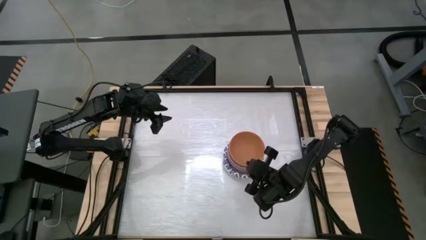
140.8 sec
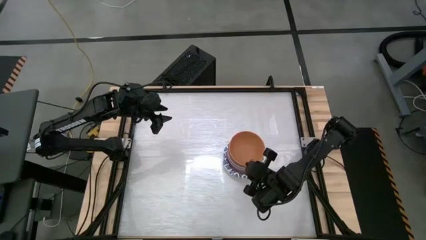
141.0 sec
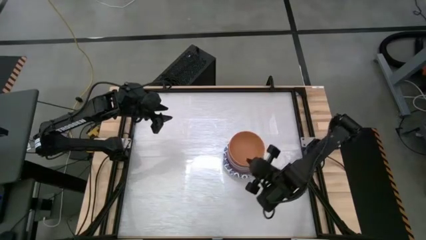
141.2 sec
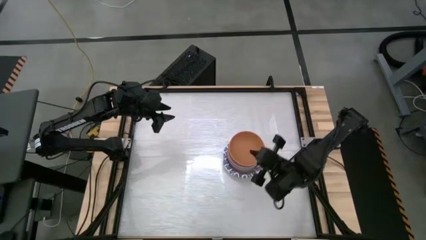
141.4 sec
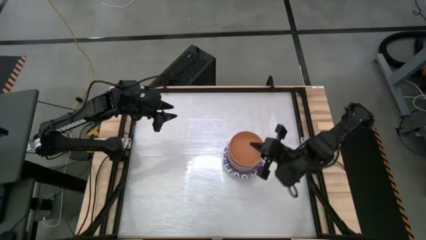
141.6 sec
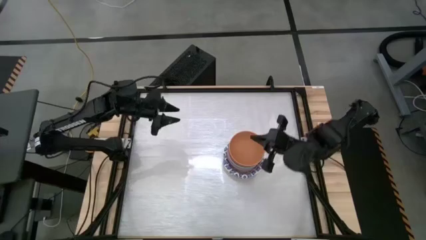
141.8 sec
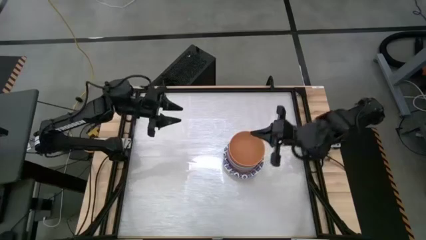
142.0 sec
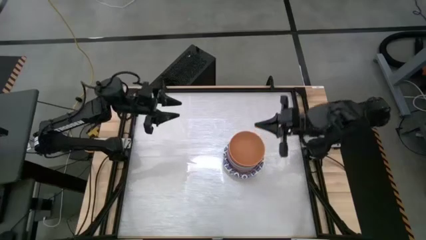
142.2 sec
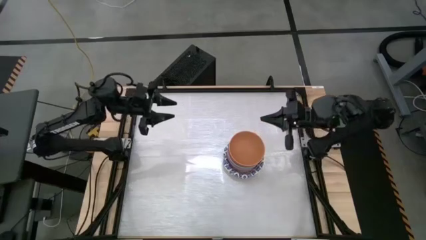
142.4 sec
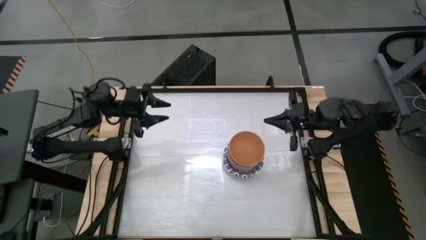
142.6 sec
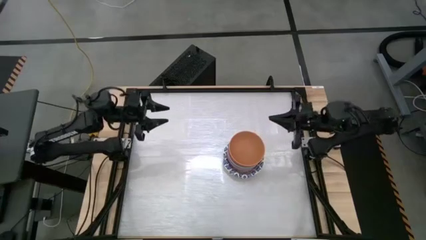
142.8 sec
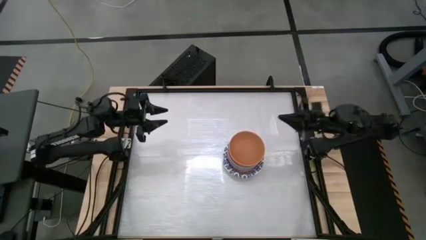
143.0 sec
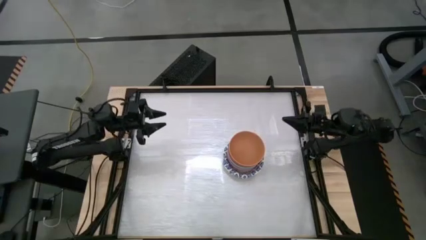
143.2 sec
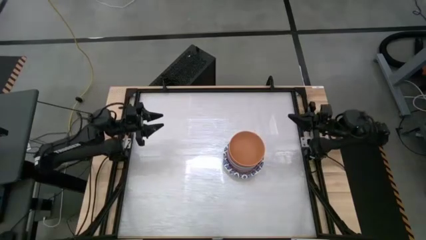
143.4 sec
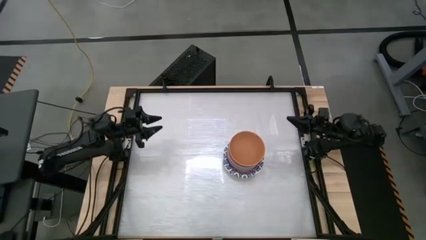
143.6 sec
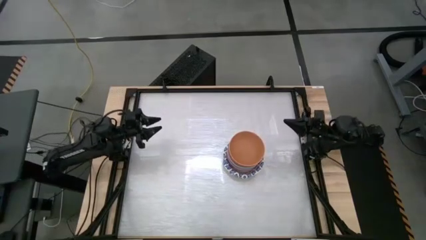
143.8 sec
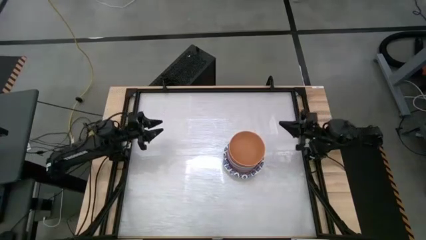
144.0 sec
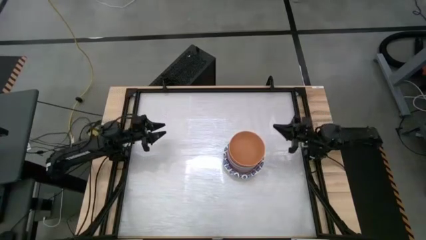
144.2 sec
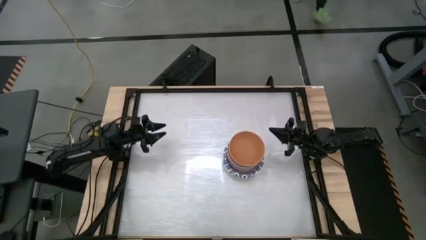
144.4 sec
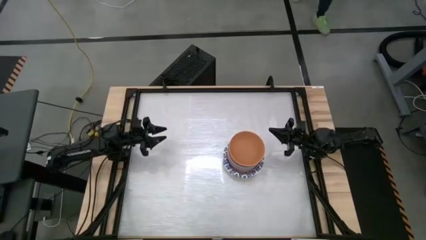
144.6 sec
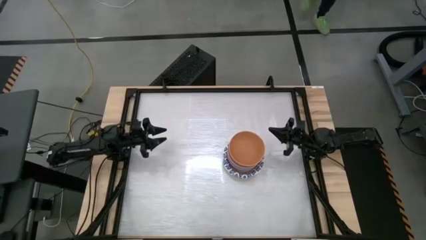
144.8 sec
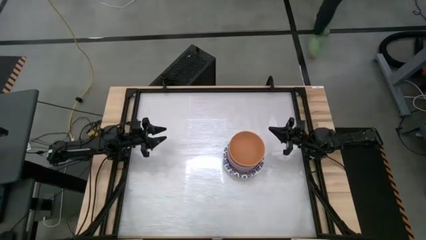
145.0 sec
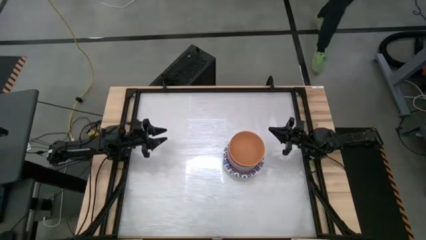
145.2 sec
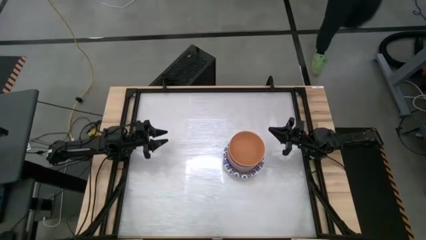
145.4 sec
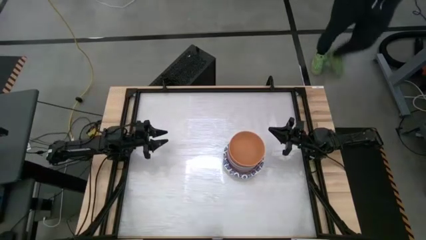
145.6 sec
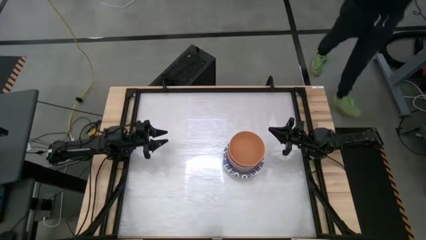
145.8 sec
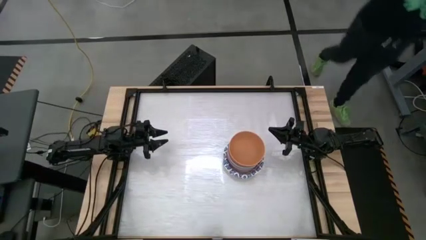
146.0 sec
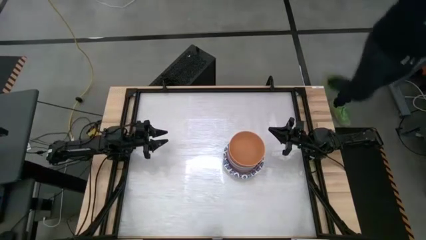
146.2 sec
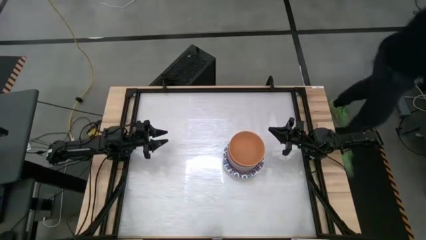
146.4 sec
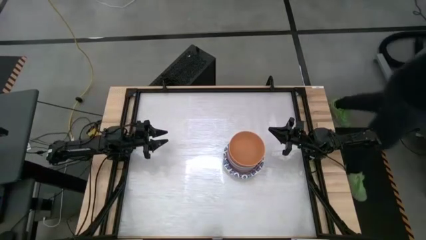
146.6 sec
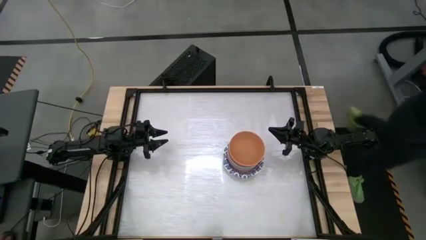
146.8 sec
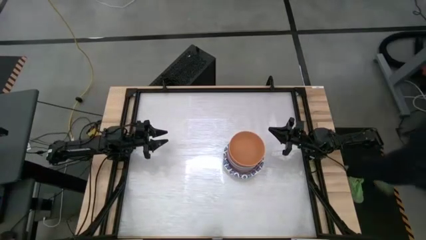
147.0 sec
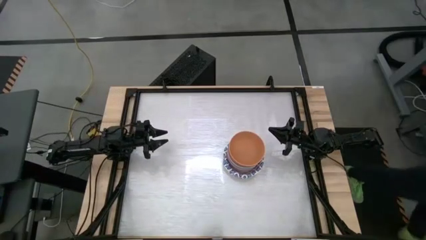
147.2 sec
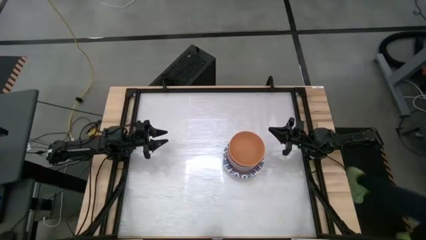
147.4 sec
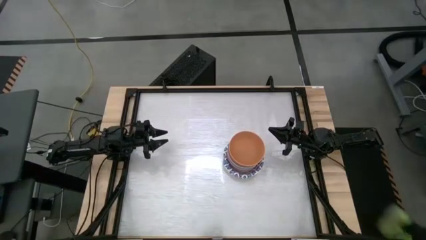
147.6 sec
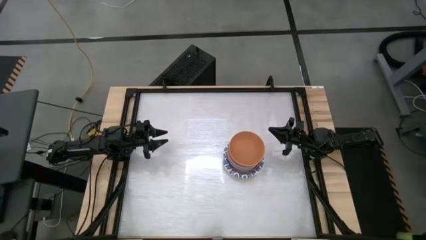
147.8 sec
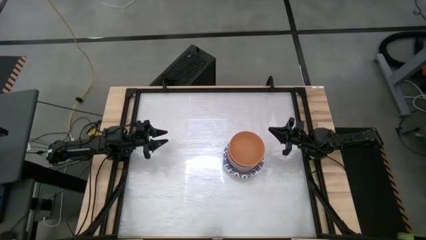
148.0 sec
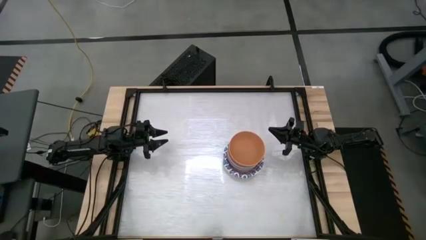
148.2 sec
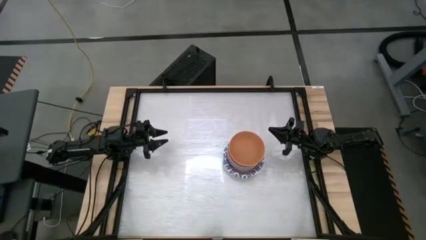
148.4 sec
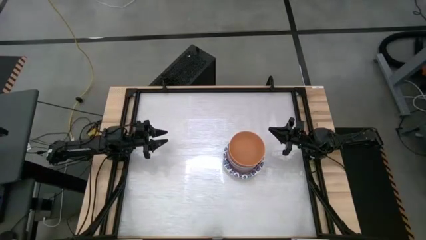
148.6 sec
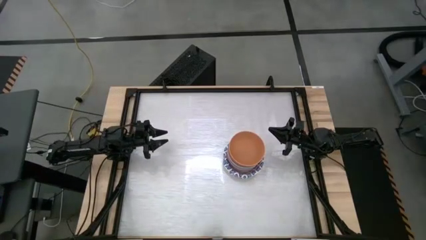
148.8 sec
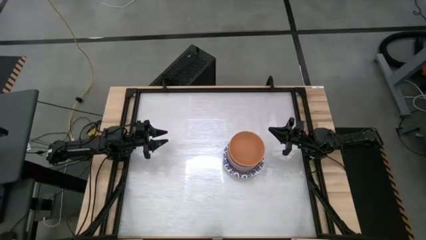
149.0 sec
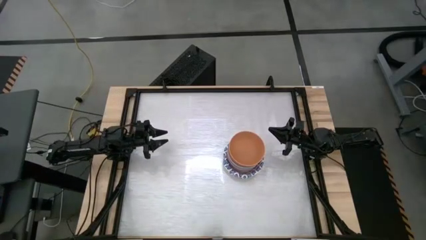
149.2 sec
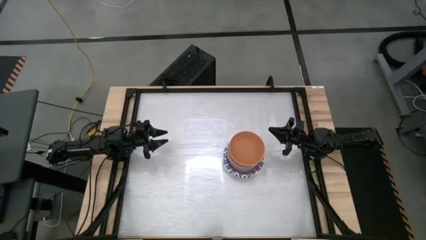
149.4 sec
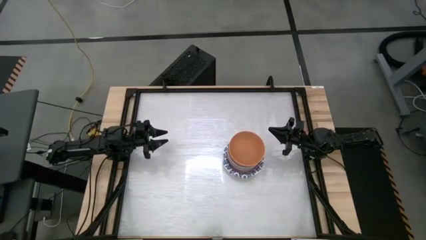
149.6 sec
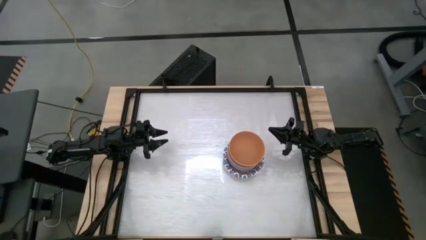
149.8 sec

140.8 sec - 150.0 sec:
Task: Nest bowls inside each other by size order
Return to Home Position

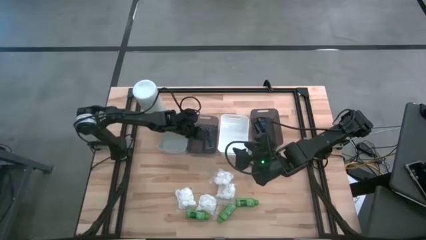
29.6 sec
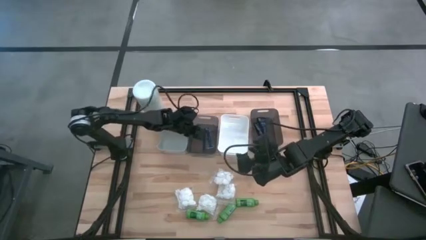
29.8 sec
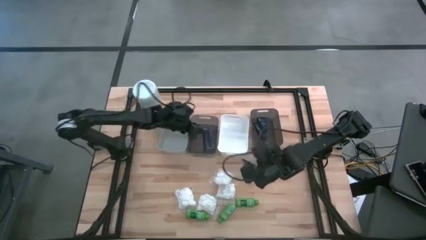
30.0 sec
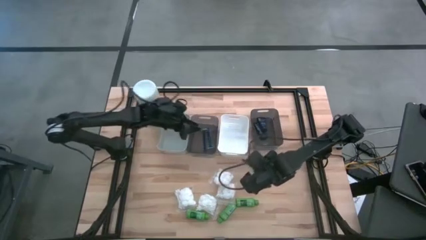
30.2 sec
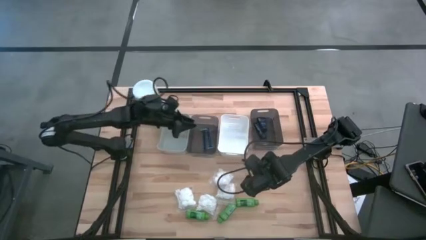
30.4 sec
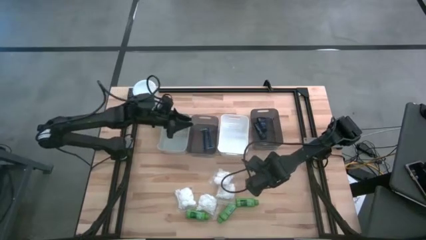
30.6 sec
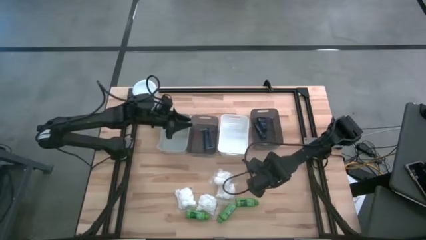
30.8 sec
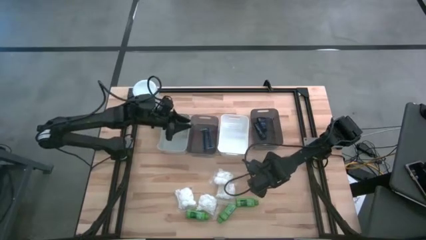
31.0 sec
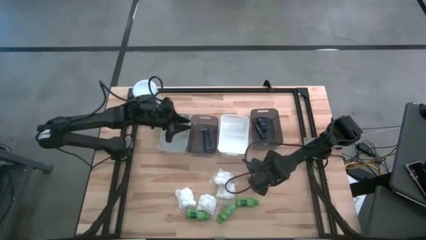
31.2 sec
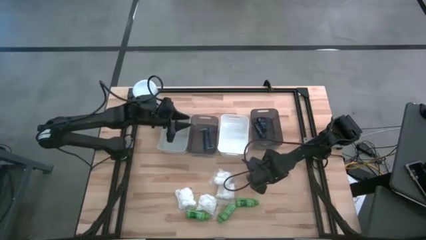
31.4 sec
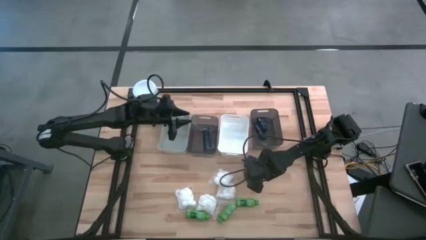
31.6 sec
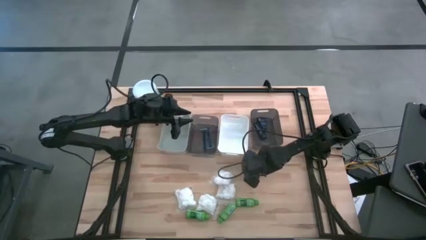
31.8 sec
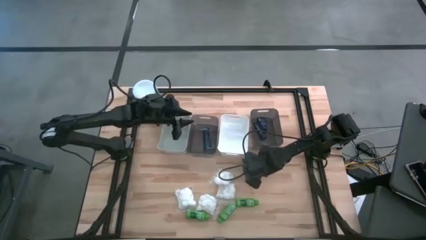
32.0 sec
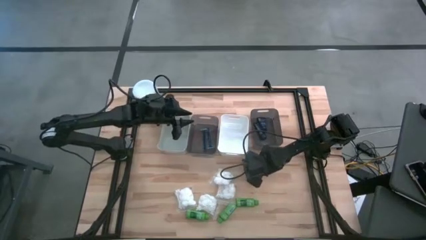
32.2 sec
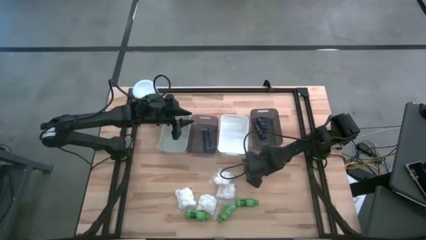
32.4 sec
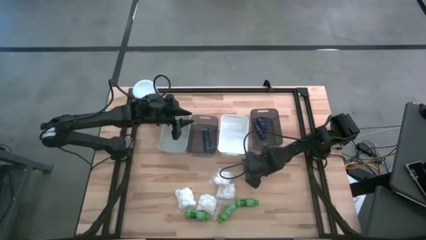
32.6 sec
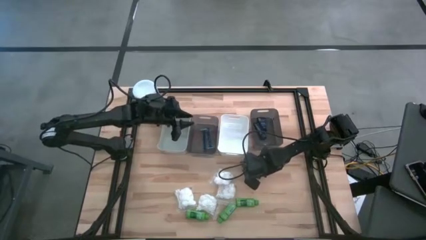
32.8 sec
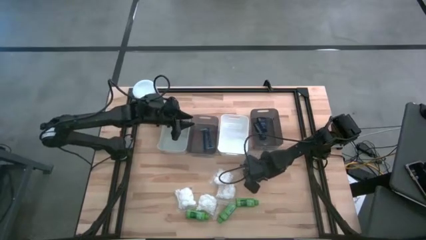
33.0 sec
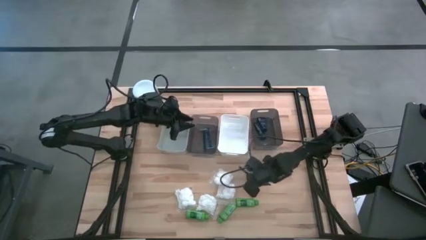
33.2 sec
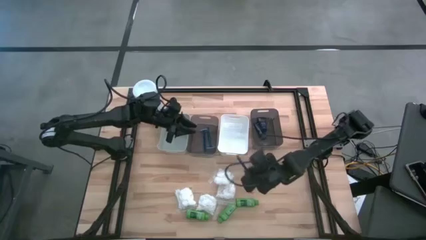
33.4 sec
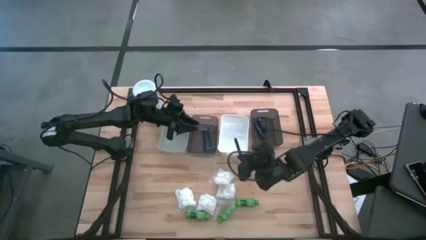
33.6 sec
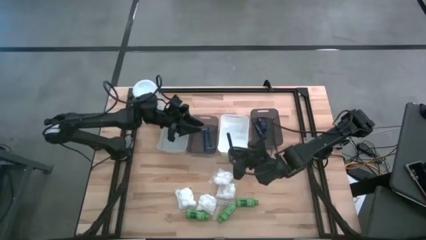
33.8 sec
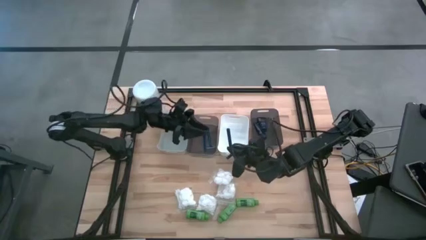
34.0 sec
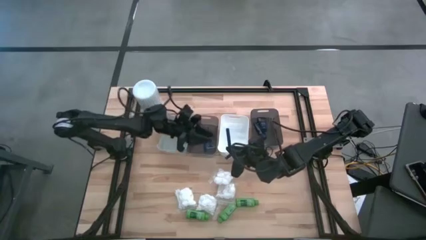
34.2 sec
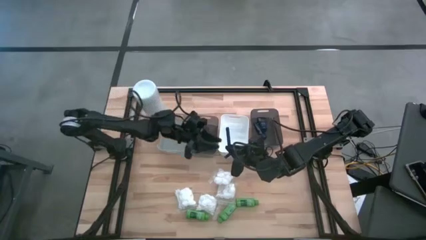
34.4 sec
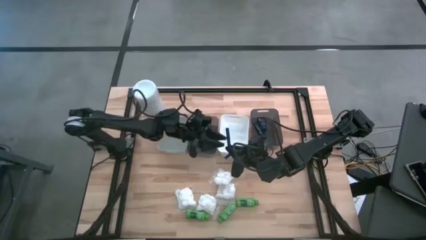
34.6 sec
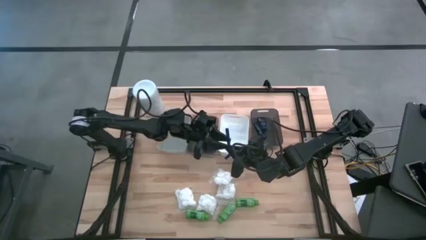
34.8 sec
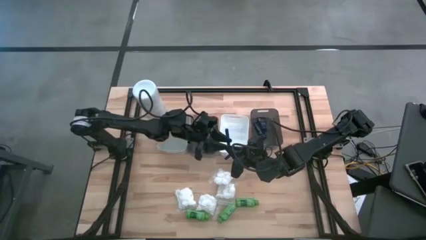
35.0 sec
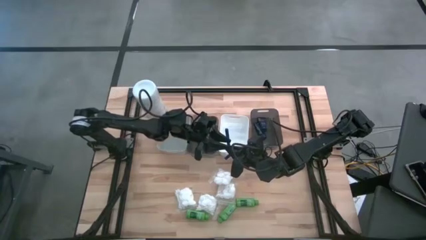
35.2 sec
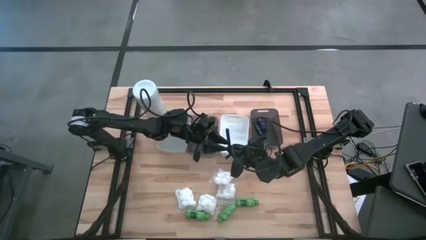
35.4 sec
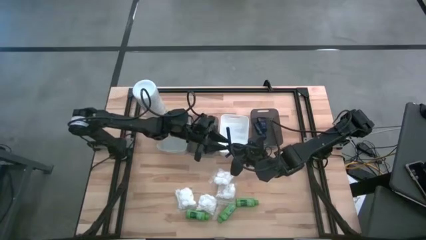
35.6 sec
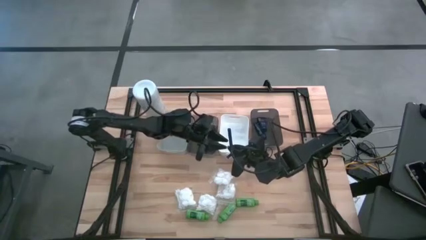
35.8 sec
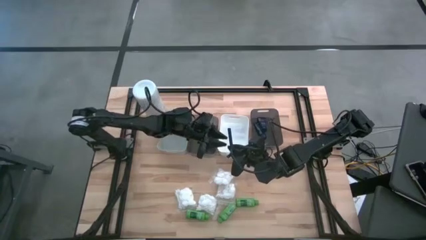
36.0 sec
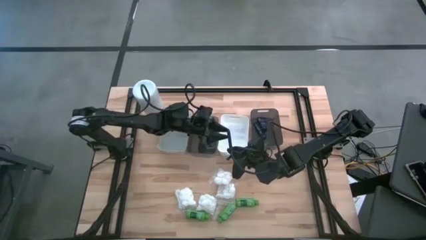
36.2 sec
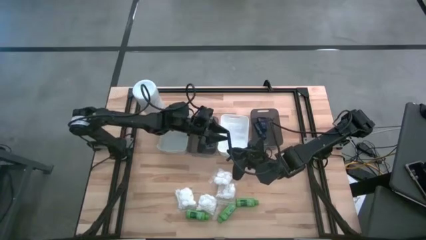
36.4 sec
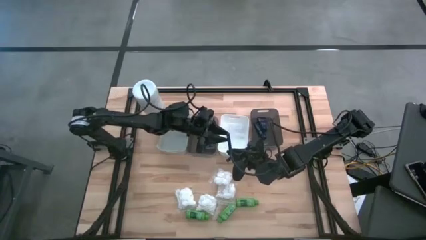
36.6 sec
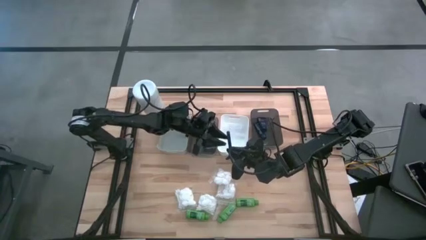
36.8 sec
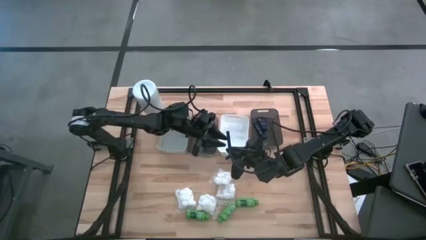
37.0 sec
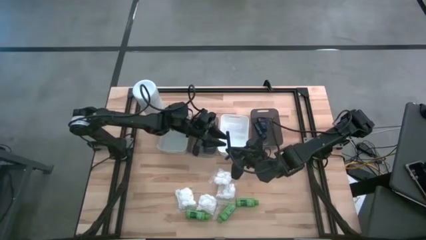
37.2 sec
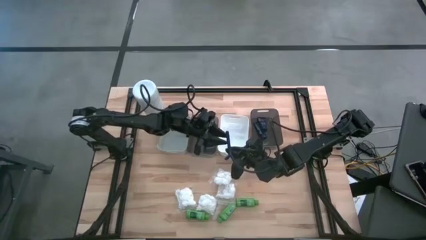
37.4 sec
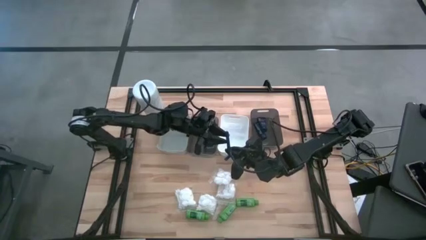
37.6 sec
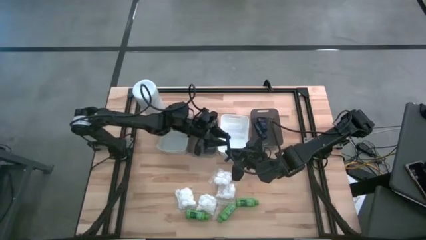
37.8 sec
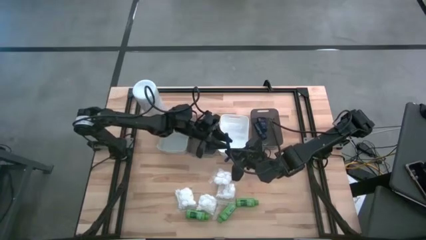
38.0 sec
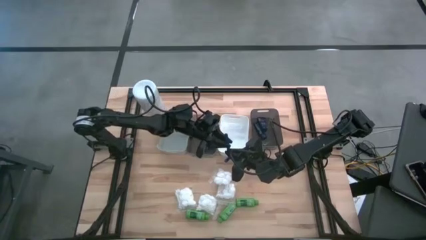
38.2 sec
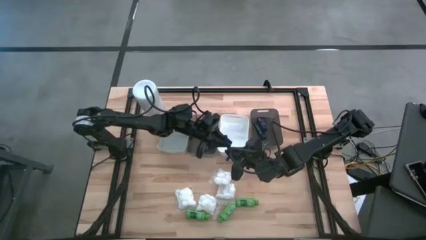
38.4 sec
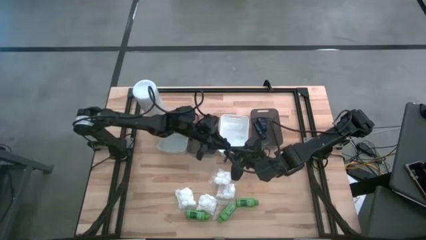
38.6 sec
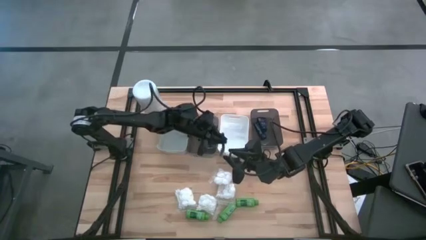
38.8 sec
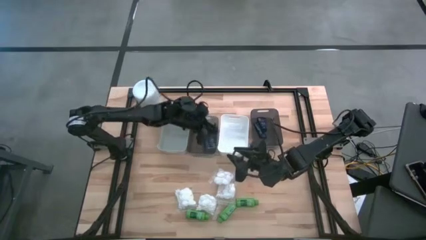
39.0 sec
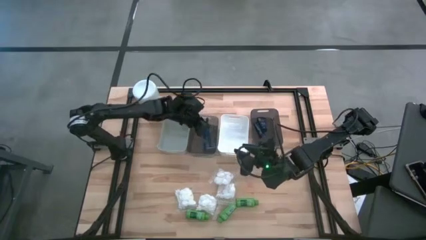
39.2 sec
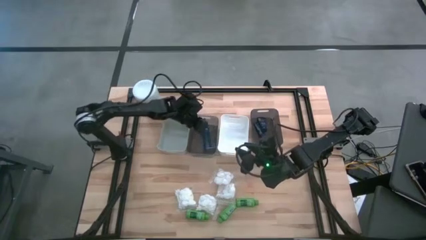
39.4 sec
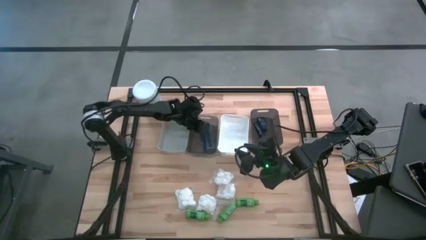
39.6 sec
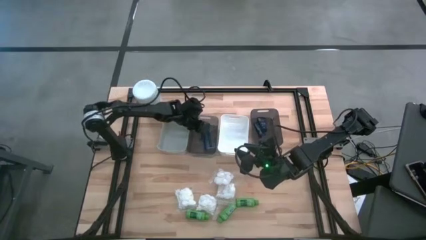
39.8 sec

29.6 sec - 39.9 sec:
Task: Pick & Place Travel size toiletries
Put the blue razor into the left black bin
